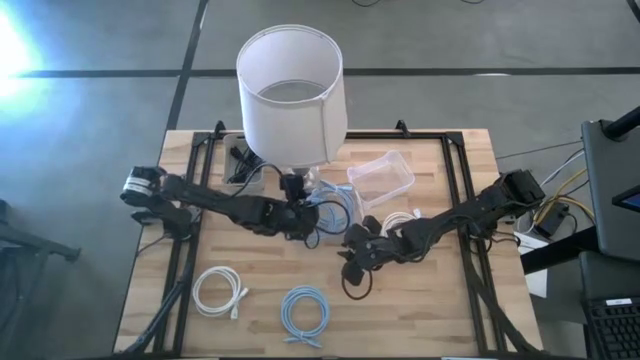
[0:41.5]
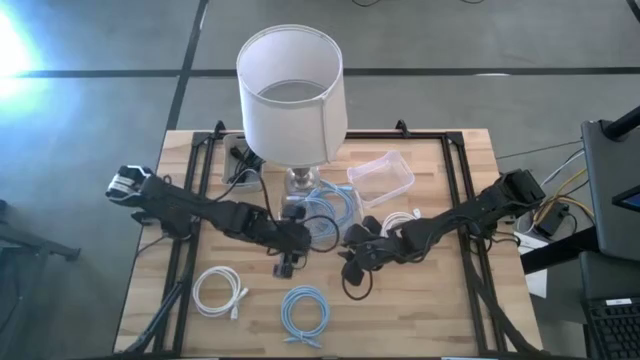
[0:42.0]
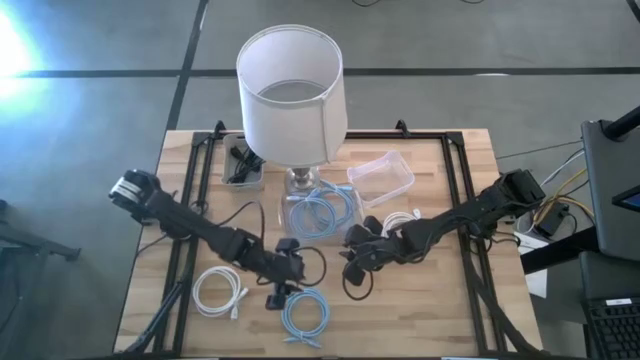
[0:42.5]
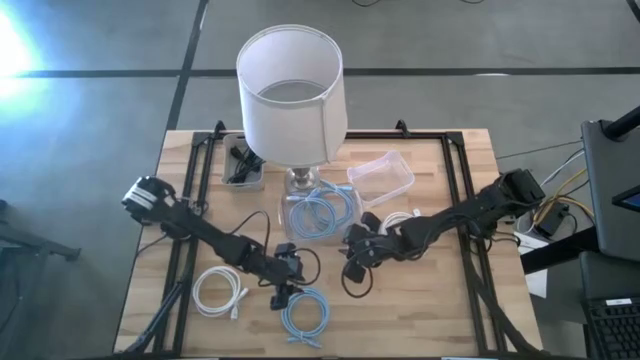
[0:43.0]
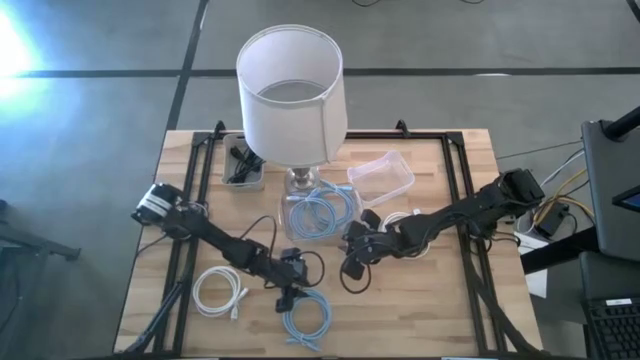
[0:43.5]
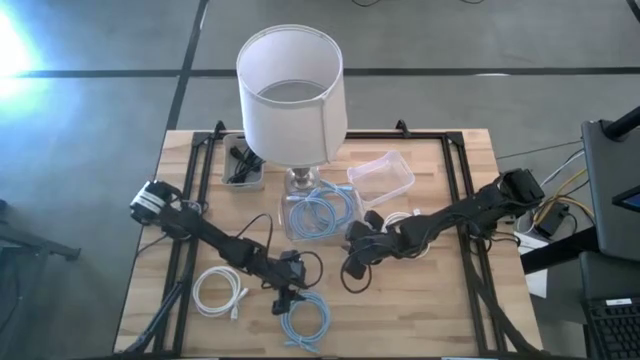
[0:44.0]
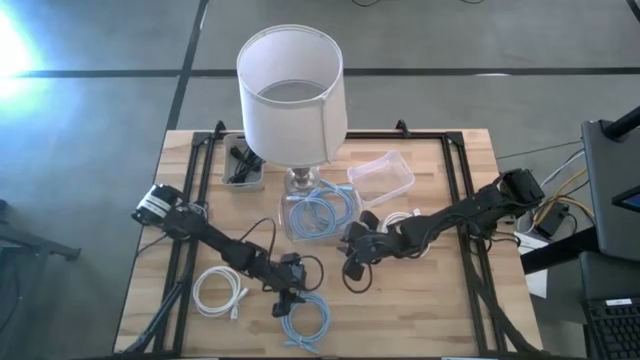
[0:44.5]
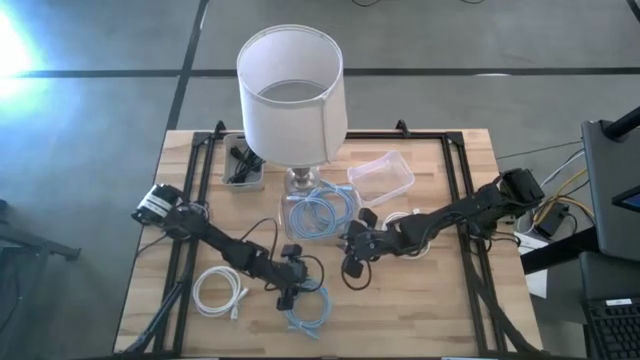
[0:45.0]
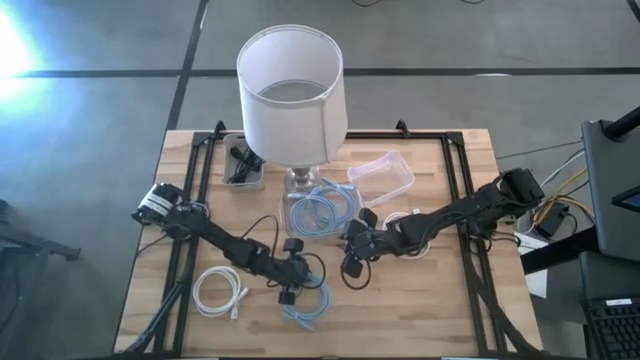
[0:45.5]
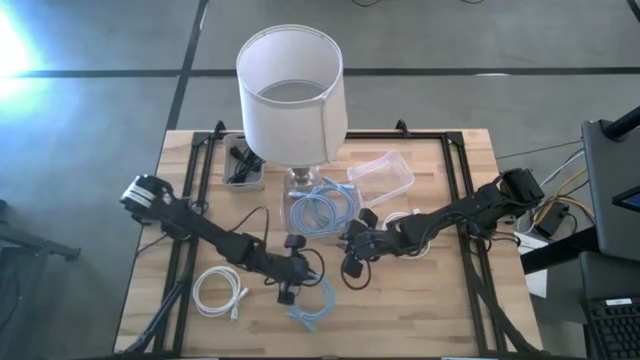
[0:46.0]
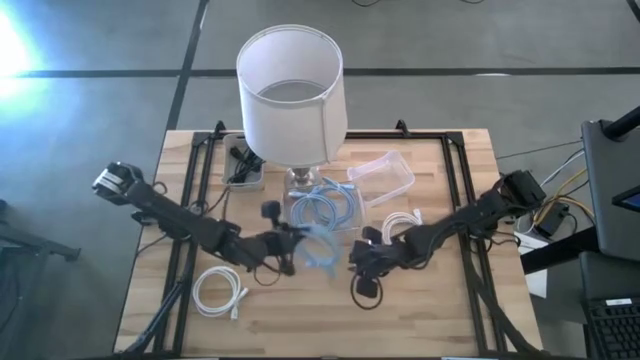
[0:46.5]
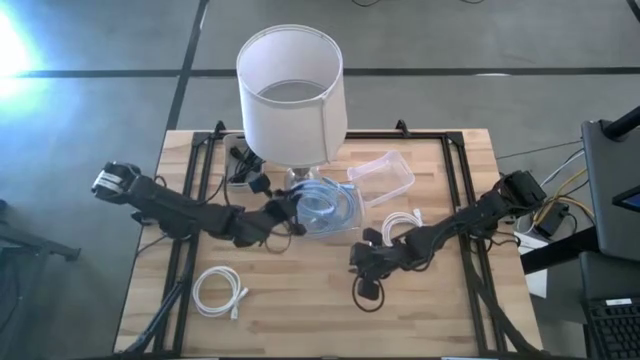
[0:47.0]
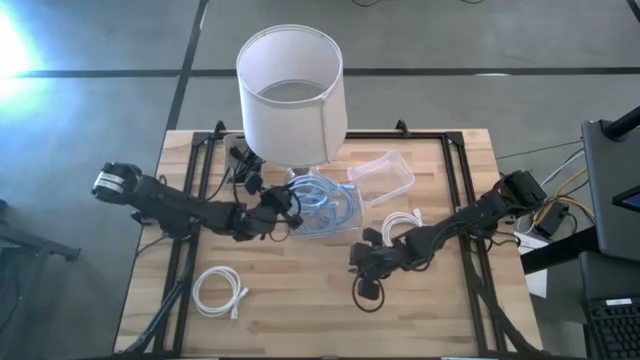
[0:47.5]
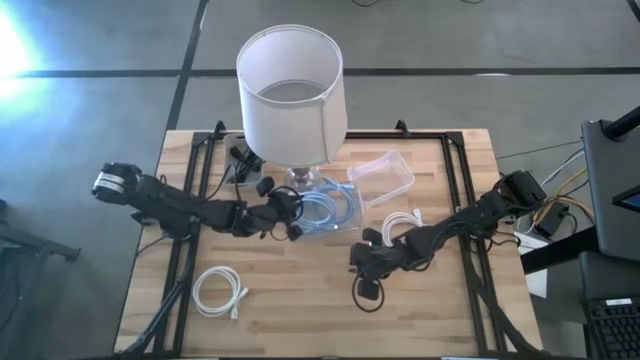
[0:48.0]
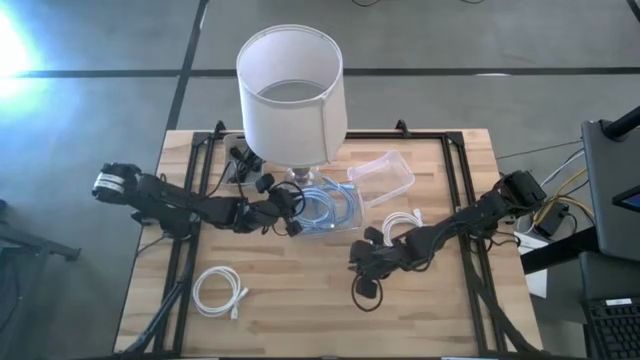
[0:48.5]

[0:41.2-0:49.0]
Task: Pick & Place USB Port
Put the blue hdmi cable into the left transparent bin

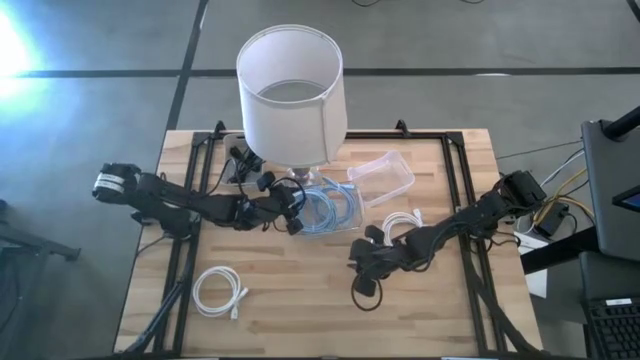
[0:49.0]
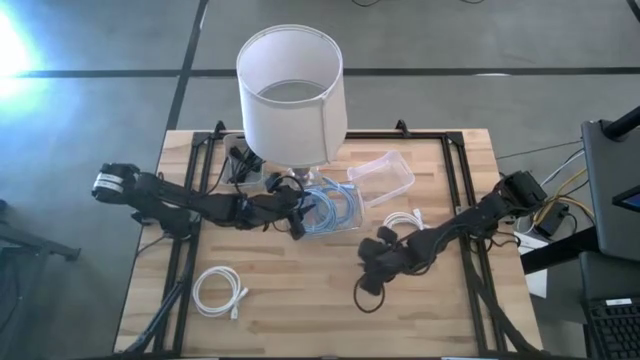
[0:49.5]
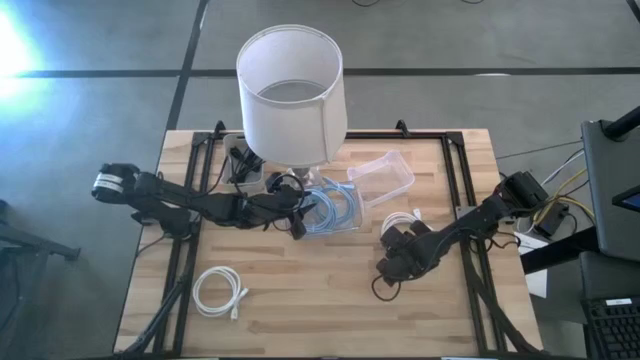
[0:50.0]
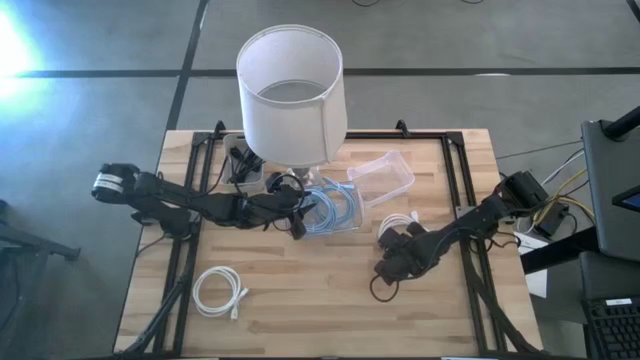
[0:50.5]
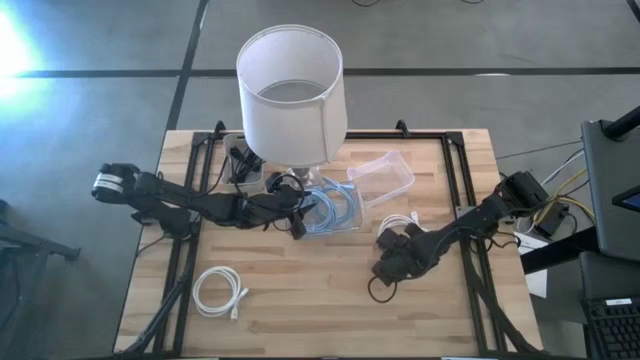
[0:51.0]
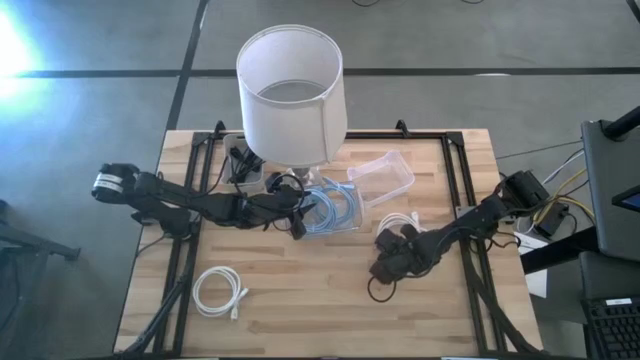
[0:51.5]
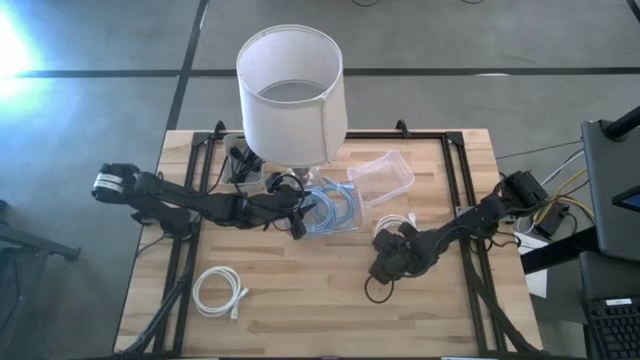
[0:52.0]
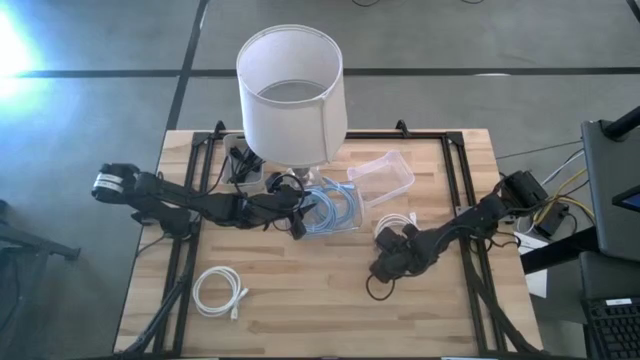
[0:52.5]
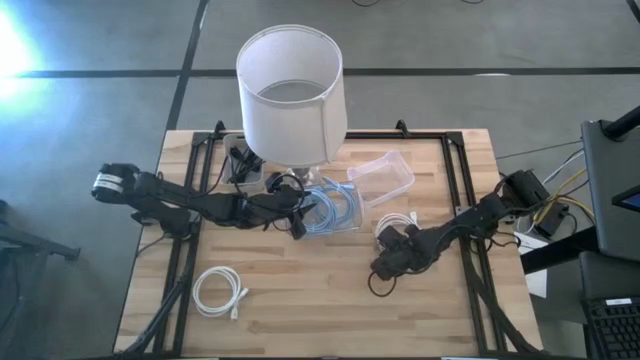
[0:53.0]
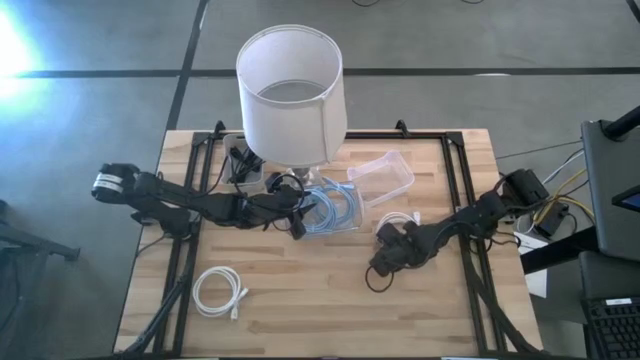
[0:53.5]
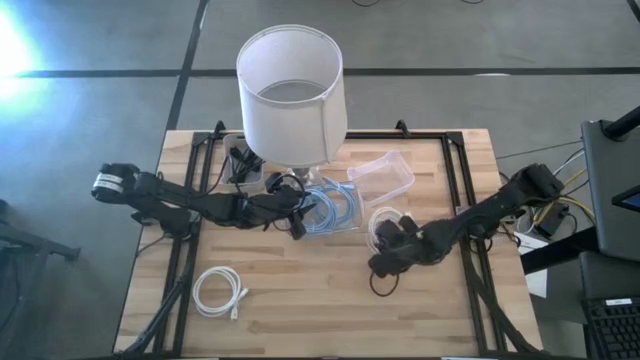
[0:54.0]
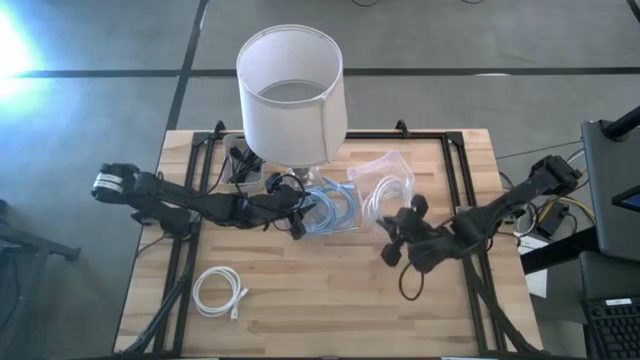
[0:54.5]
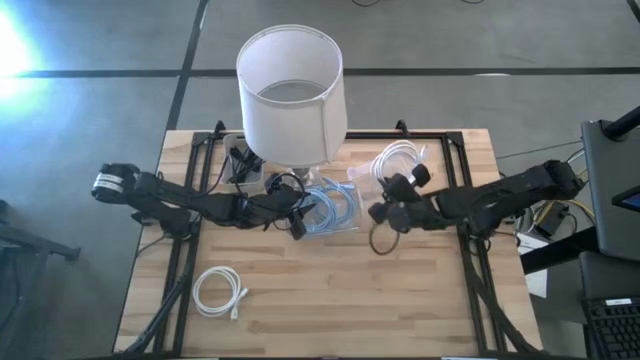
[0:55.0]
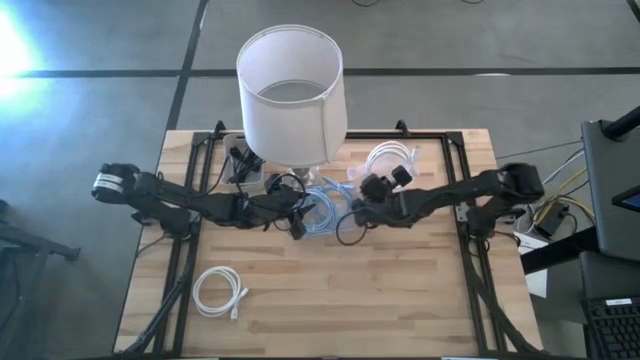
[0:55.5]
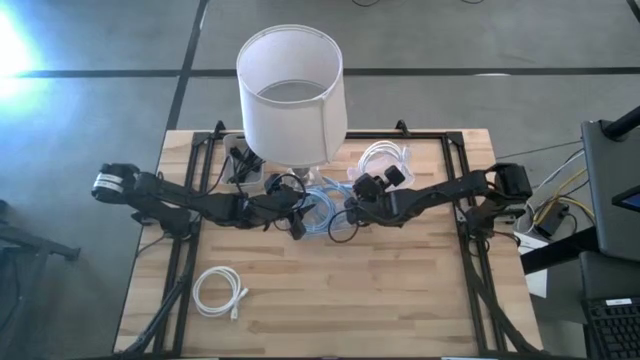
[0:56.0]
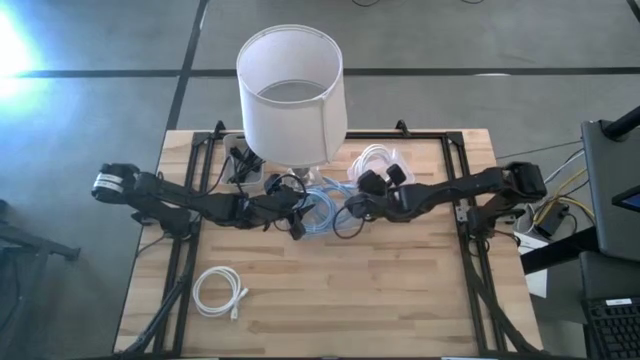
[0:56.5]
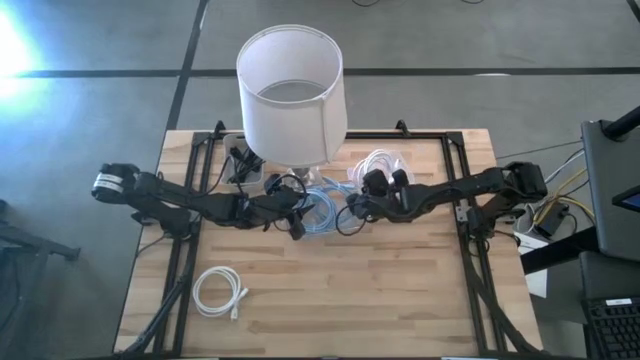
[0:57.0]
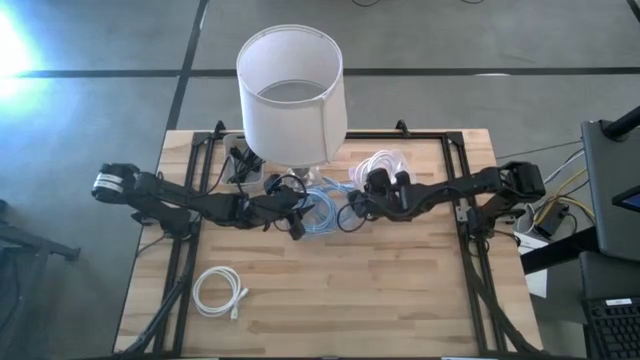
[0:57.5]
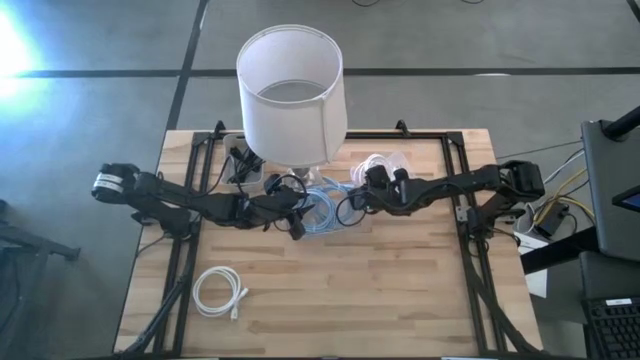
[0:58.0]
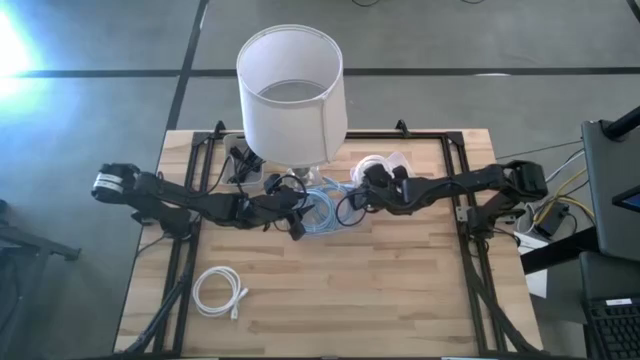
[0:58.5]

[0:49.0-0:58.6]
Put the right white hdmi cable into the right transparent bin

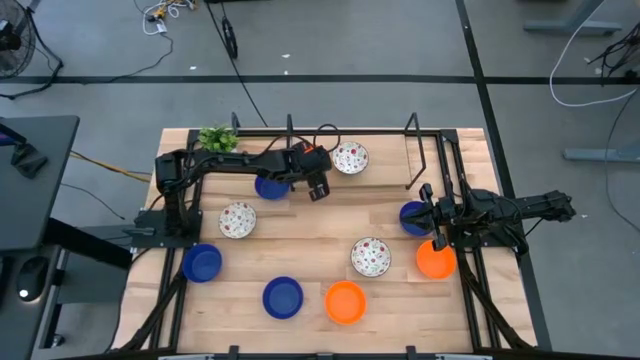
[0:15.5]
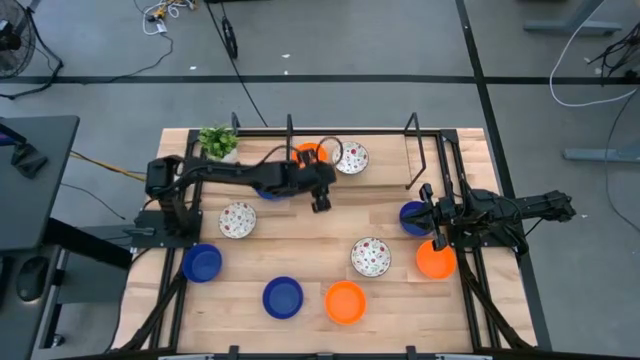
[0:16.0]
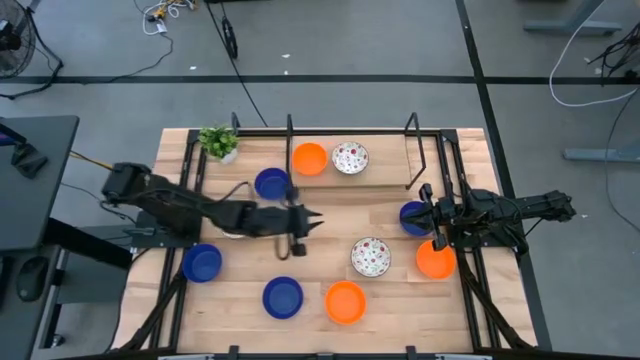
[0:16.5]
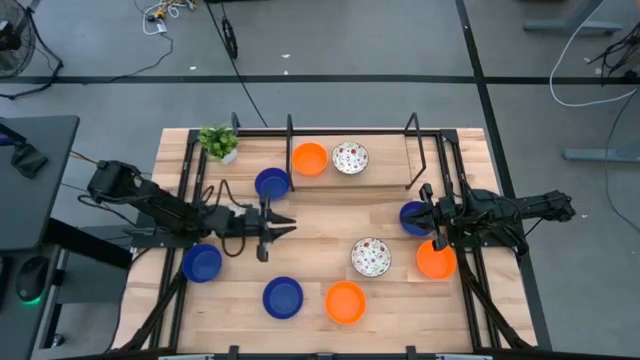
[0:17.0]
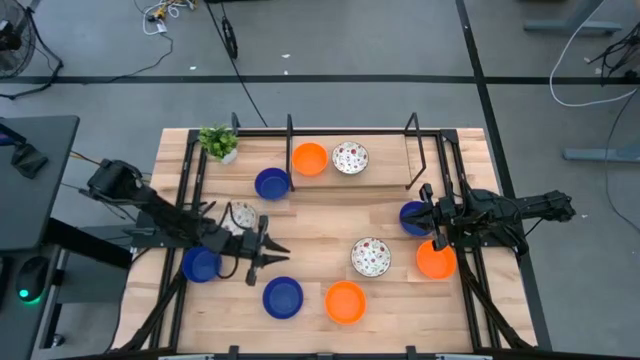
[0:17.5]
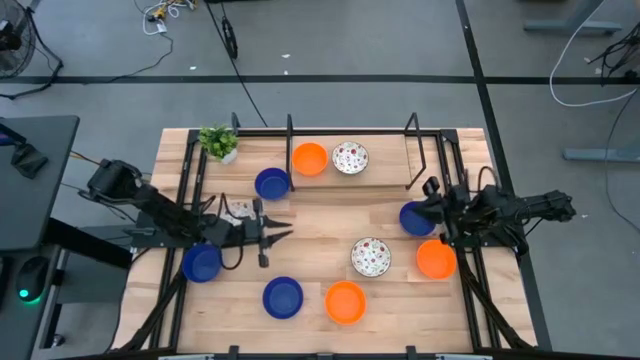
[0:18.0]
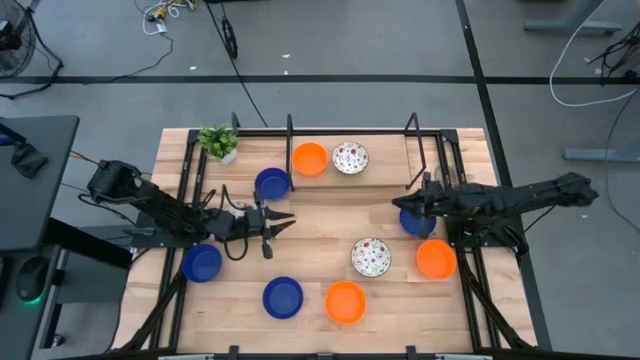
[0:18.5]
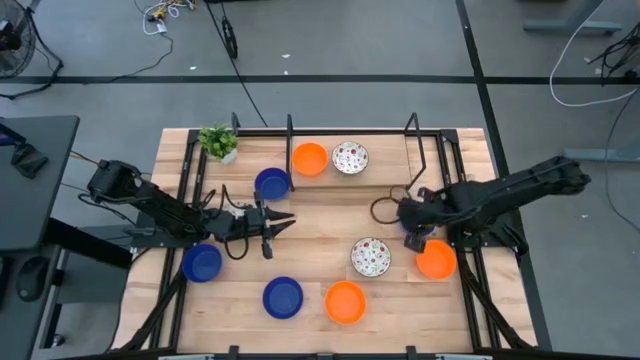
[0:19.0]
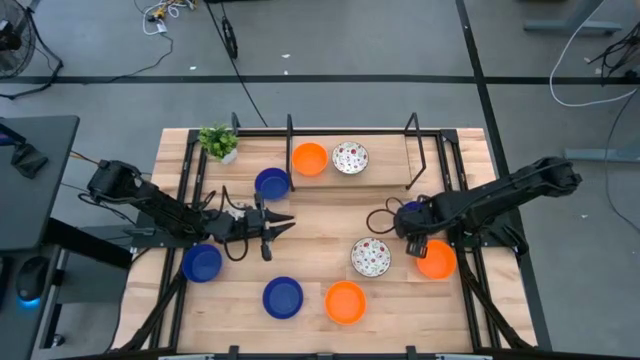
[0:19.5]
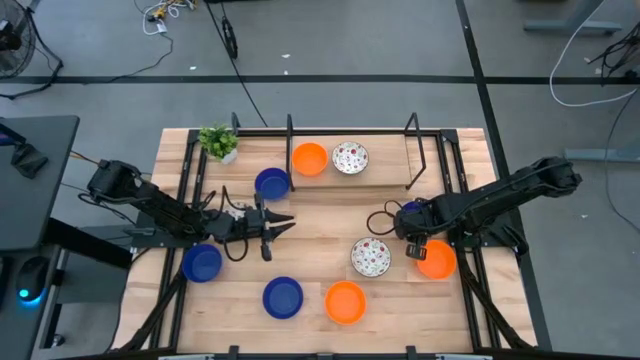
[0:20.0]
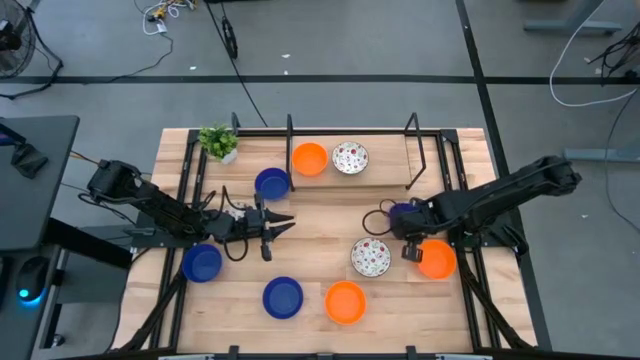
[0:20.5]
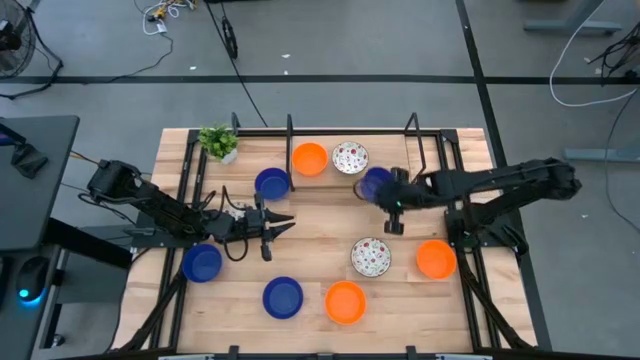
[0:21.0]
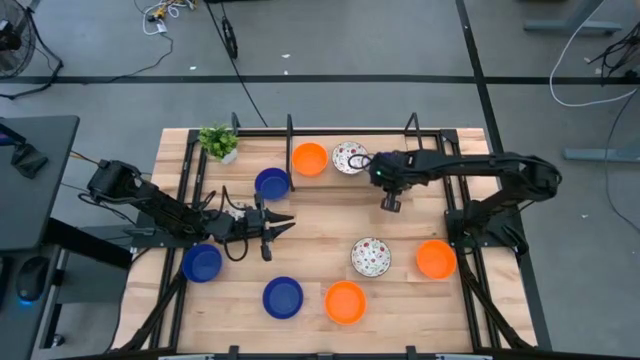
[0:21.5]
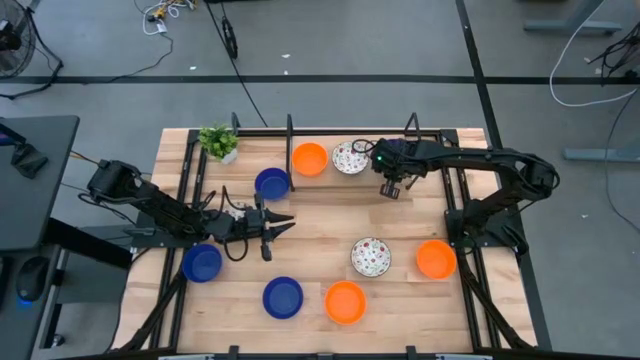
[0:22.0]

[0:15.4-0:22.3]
Task: Pick & Place Mini bowls
Put the blue bowl on the shelf
